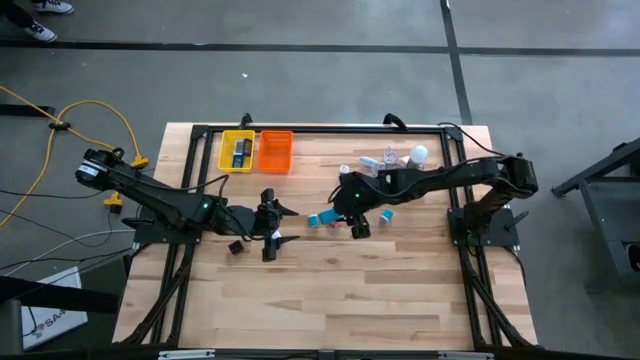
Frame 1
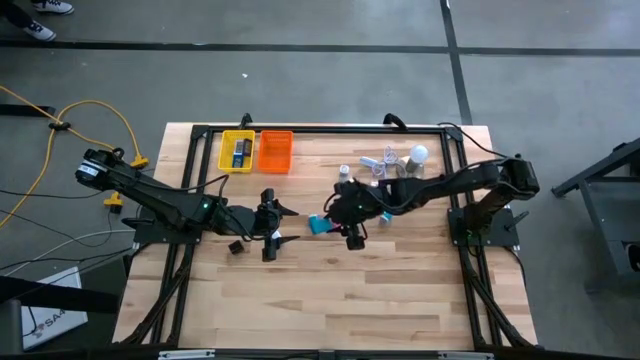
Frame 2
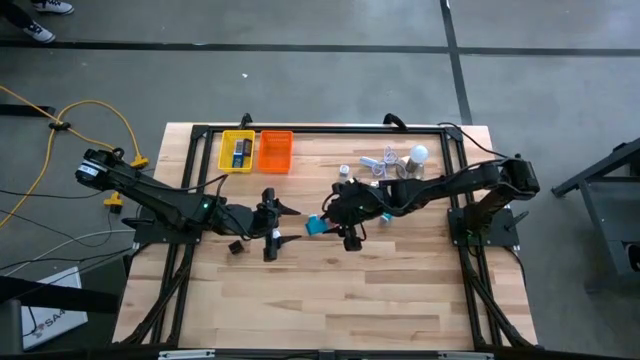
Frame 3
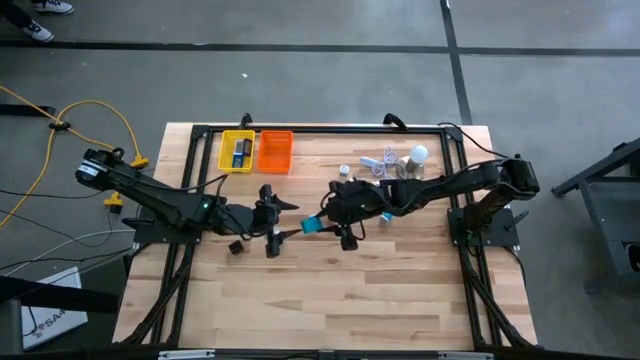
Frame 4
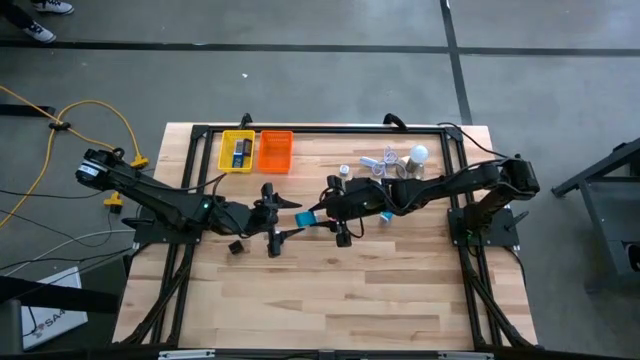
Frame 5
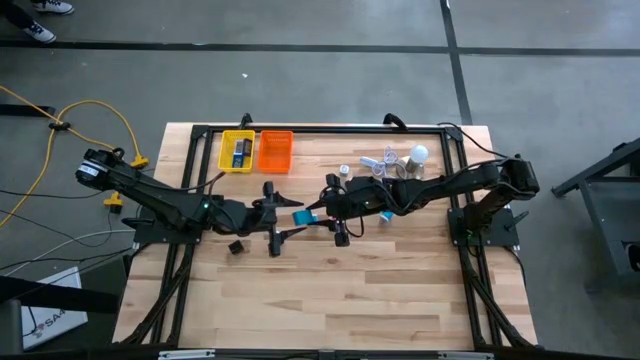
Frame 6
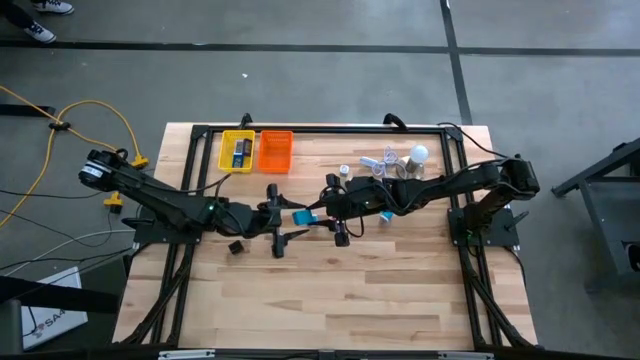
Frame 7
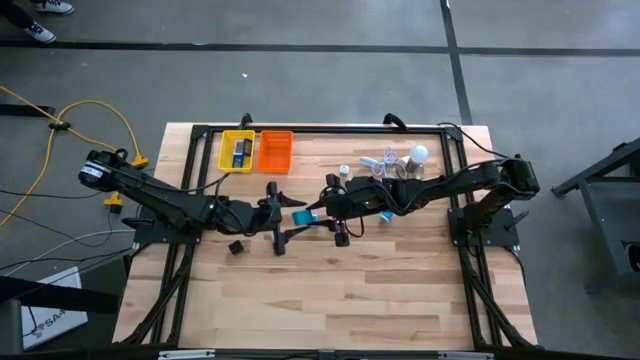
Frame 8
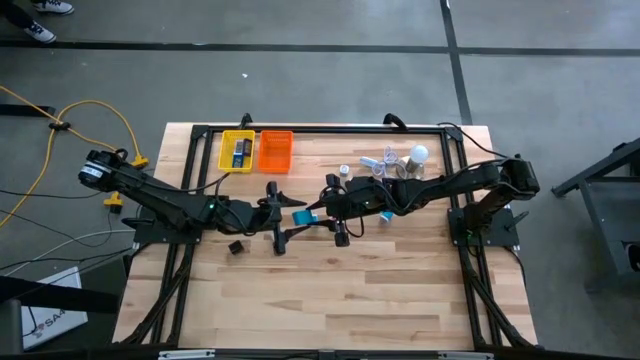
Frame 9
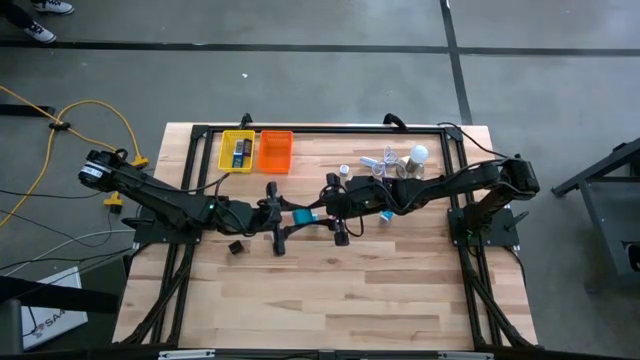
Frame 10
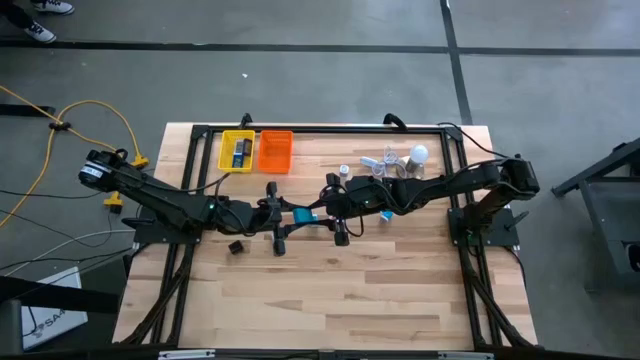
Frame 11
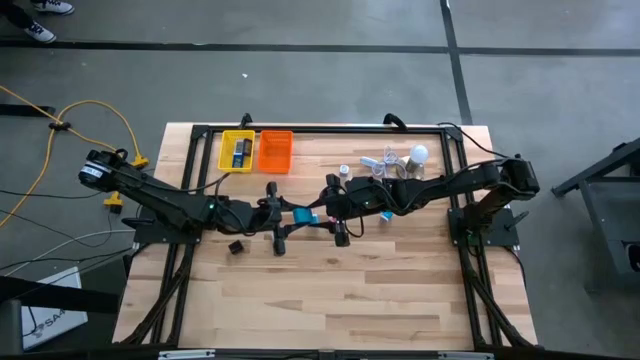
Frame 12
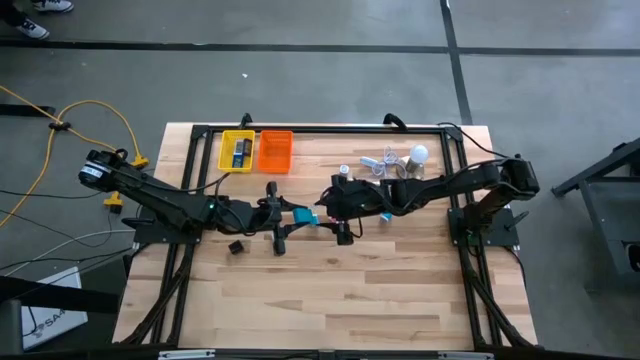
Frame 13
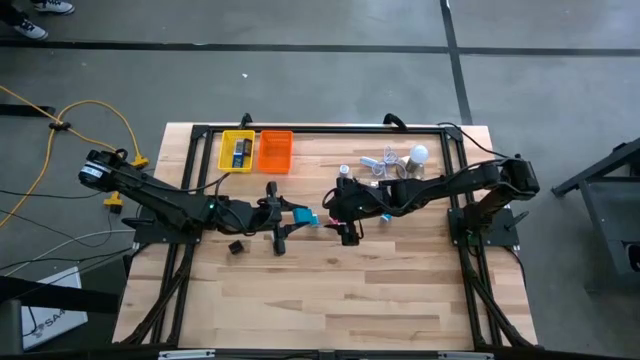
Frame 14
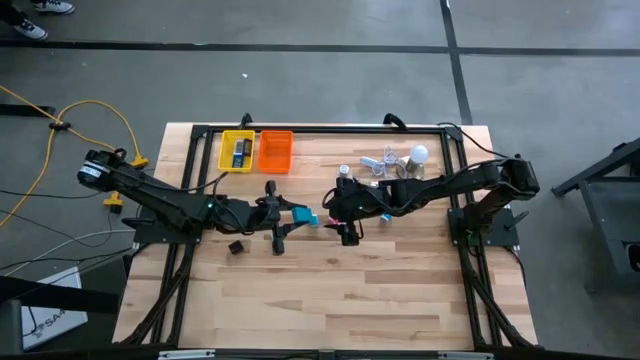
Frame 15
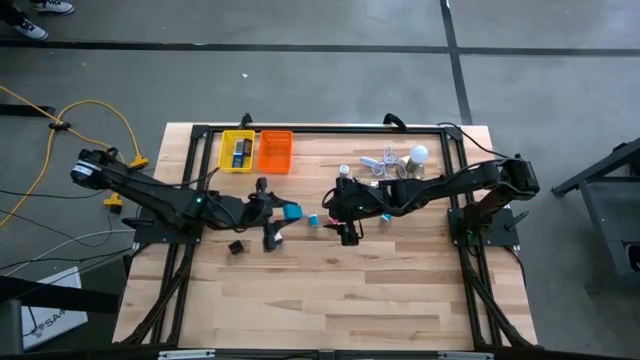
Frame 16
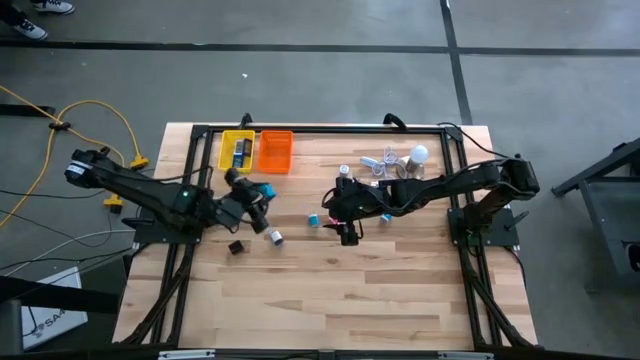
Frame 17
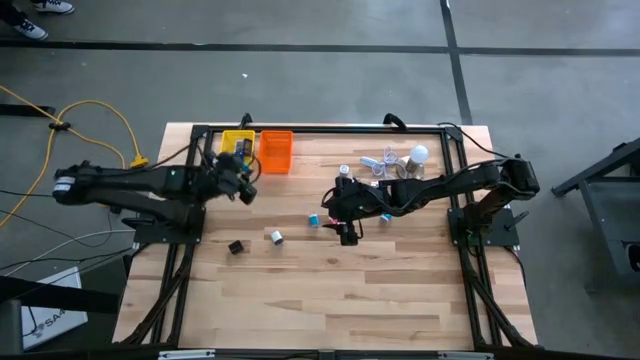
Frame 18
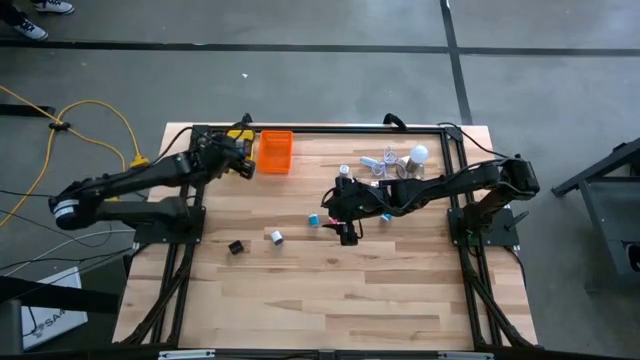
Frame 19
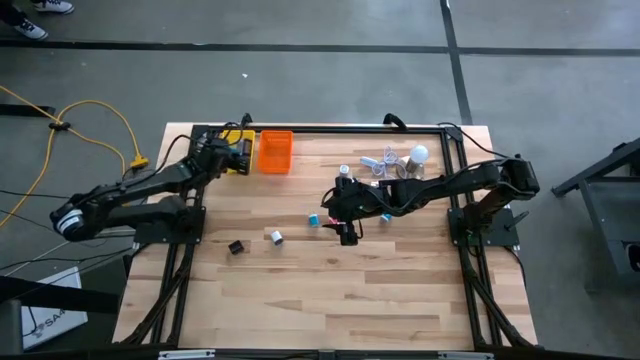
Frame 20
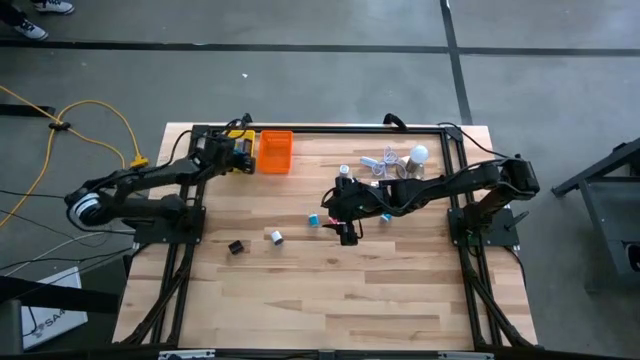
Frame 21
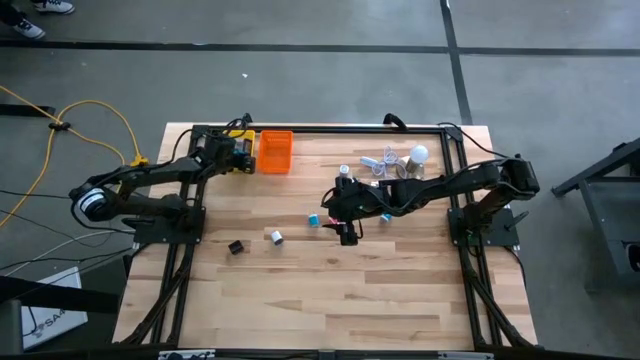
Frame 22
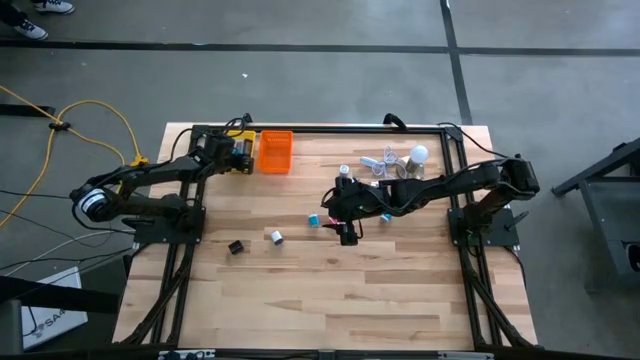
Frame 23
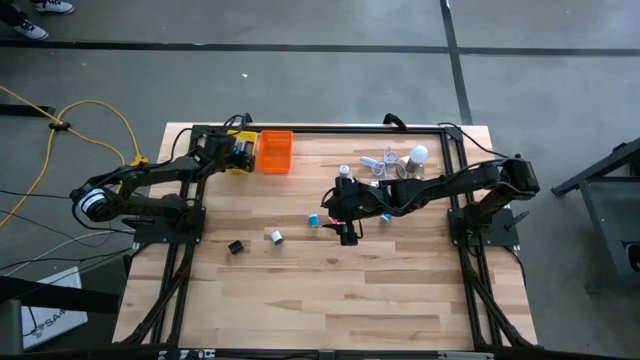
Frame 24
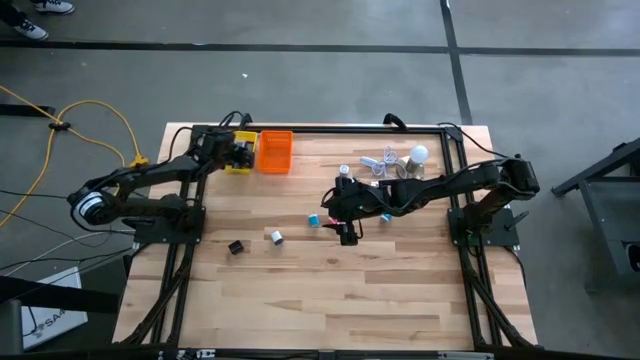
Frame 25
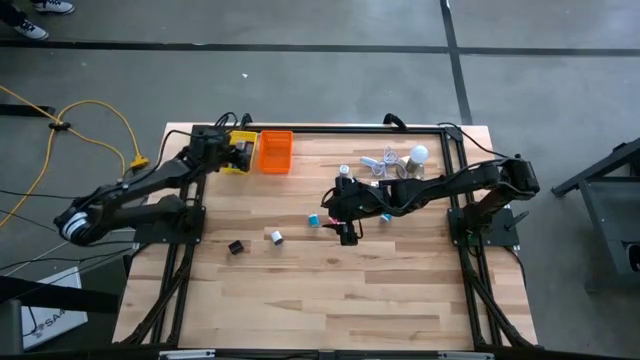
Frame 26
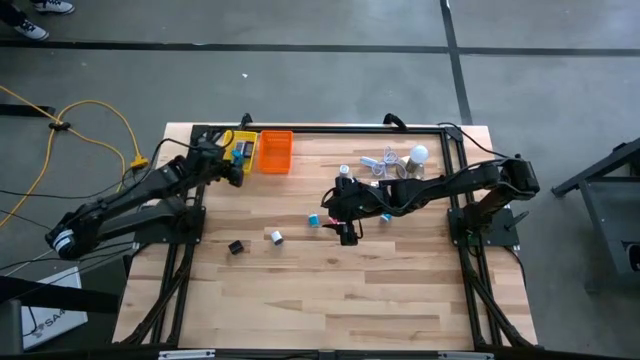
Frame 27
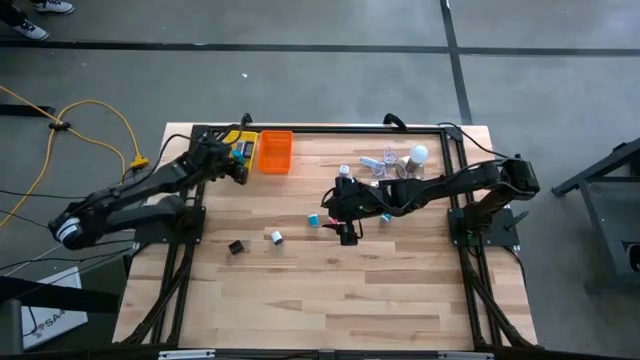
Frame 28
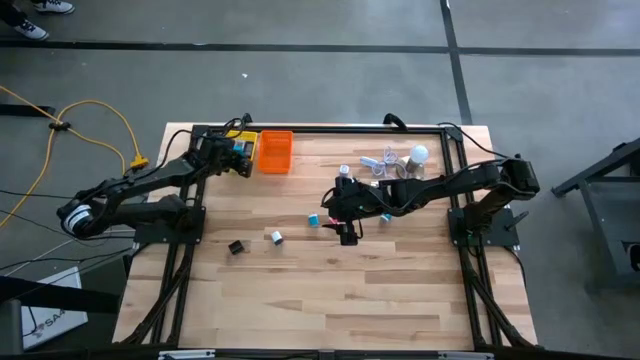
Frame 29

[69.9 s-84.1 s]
Task: Pick & Place Office items
Put the light blue digital clock into the yellow basket

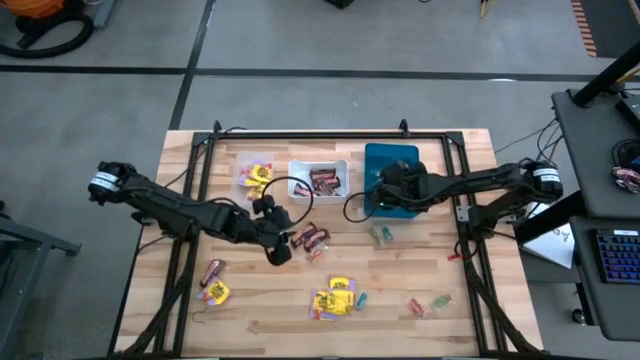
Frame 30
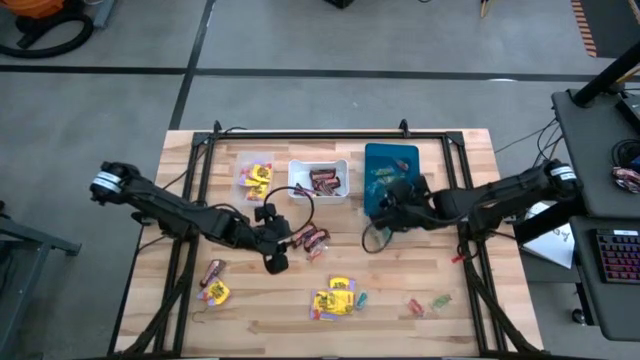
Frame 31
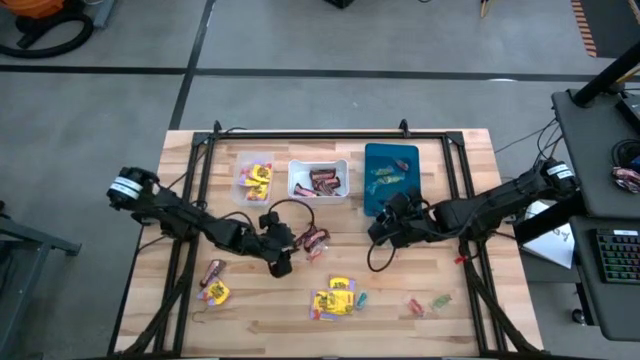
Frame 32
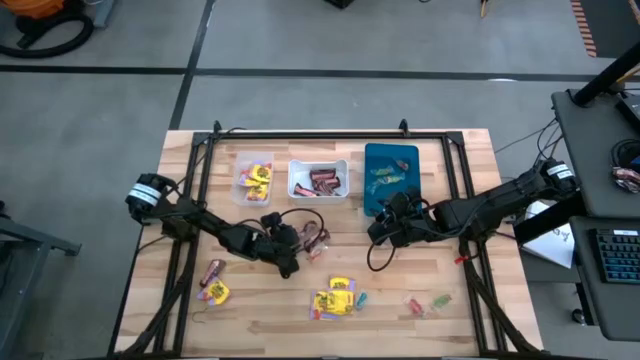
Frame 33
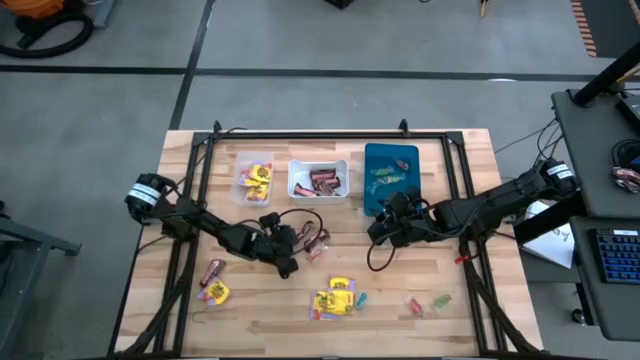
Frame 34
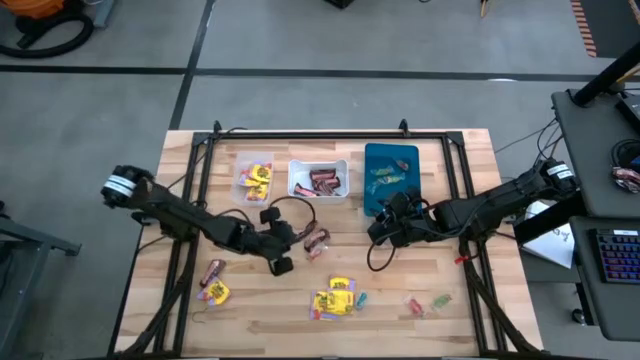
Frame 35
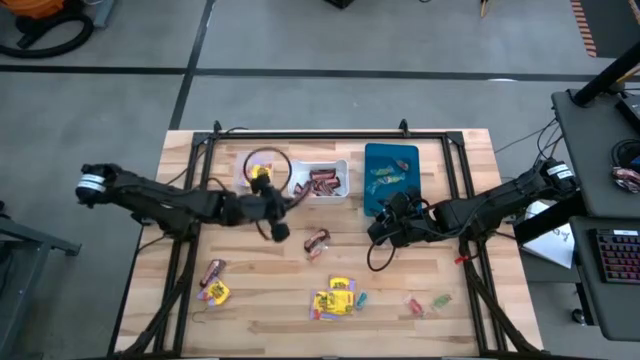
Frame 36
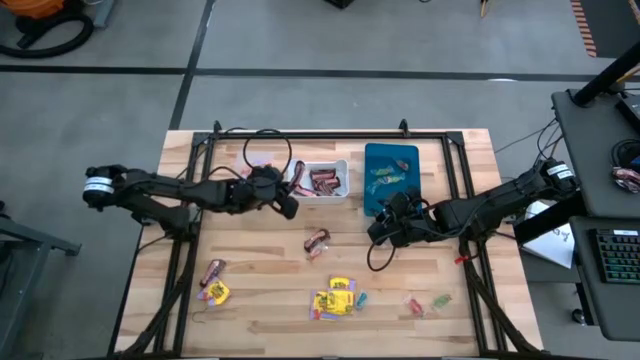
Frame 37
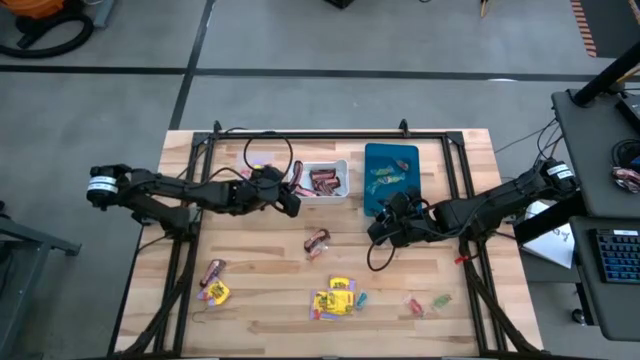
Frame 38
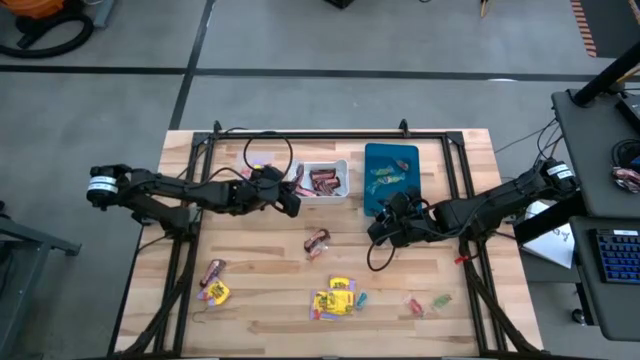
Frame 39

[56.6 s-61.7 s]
Task: Sort candy
Put the brown chocolate into the white bin

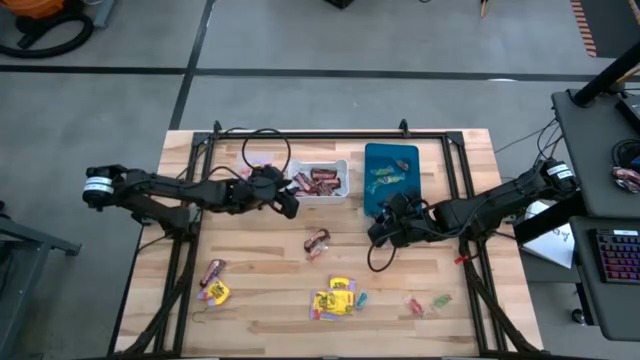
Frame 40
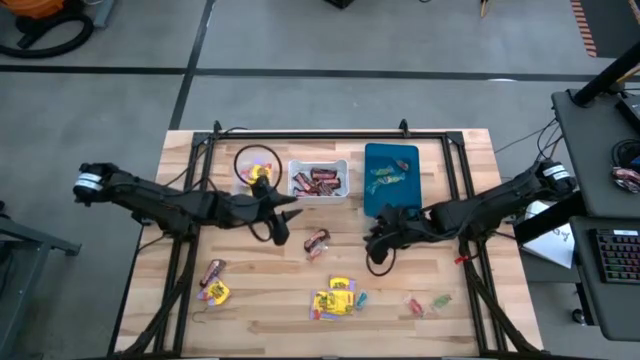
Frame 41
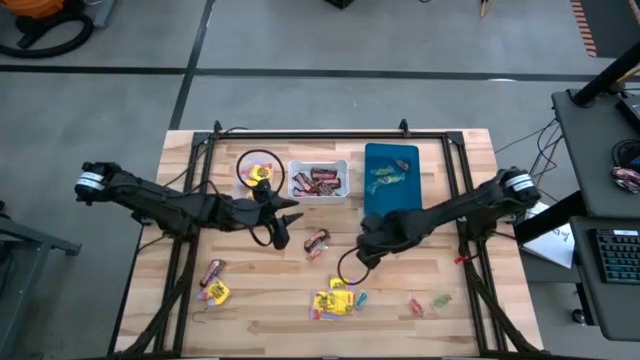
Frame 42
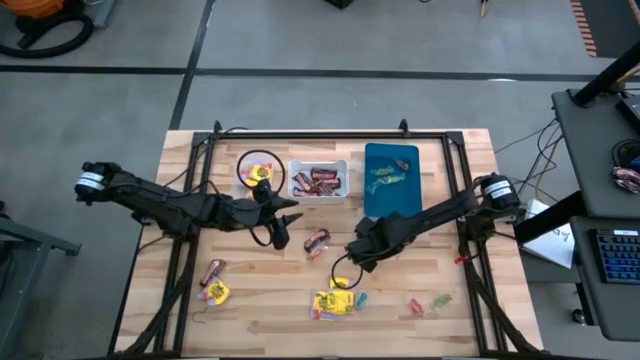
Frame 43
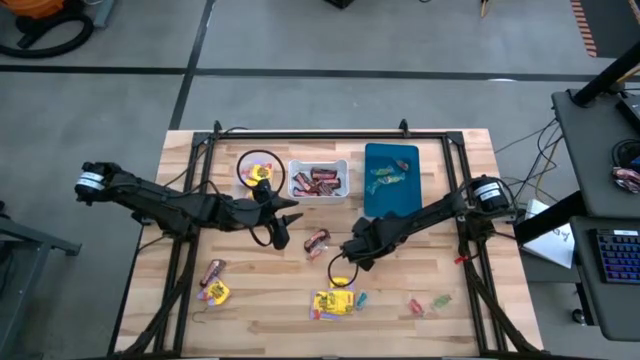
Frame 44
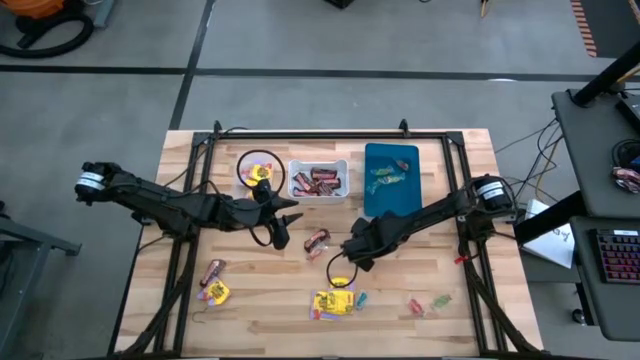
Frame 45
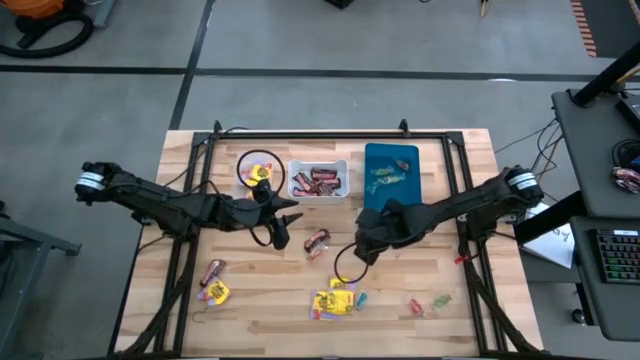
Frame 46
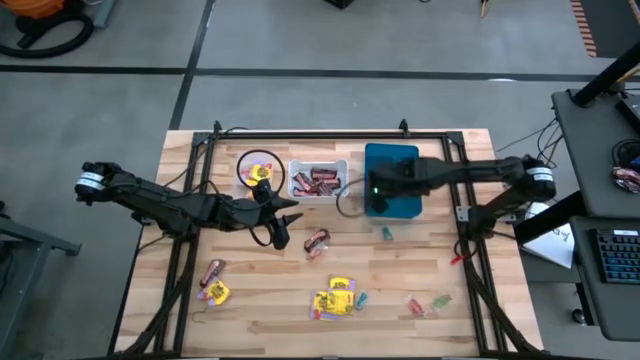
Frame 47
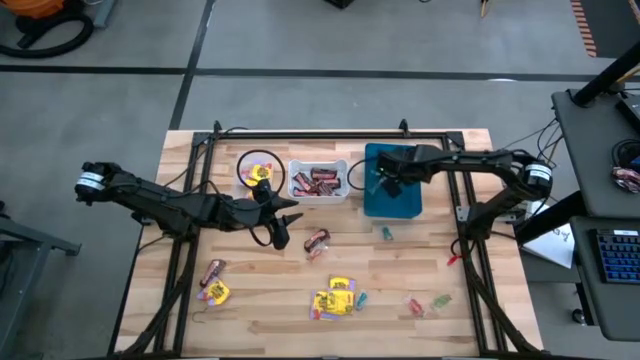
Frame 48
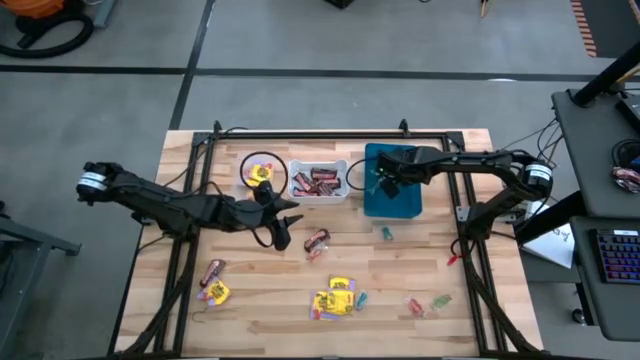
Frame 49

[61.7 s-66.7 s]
Put the green candy into the blue bin
